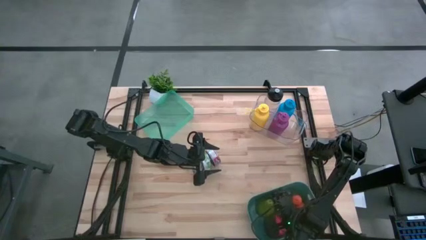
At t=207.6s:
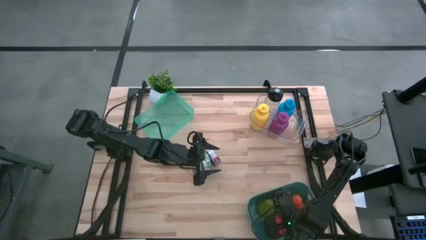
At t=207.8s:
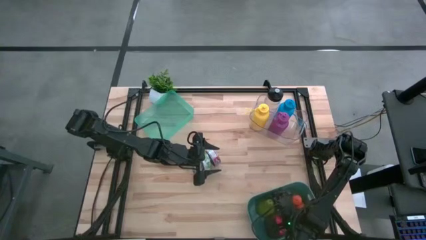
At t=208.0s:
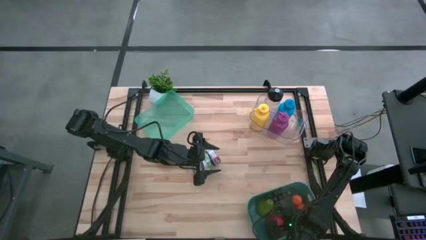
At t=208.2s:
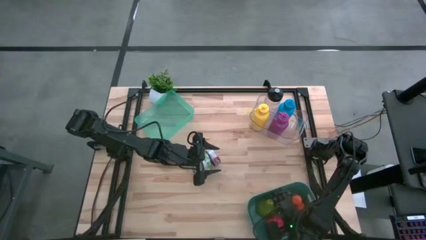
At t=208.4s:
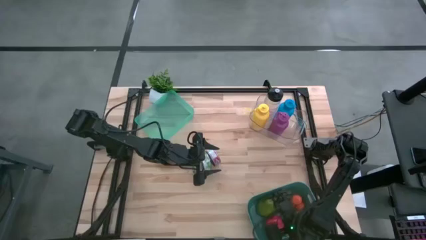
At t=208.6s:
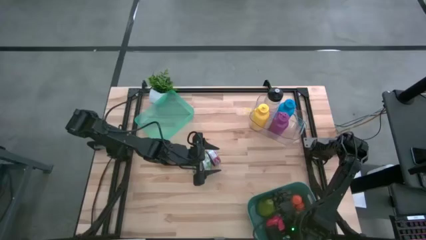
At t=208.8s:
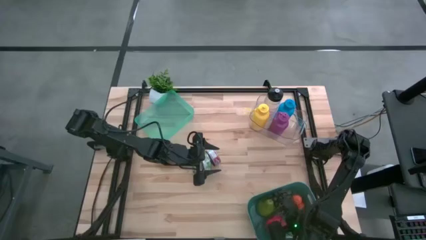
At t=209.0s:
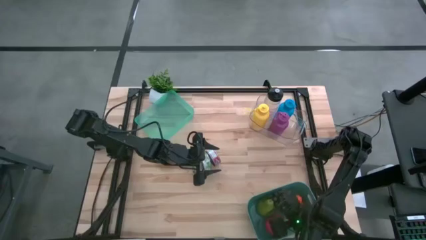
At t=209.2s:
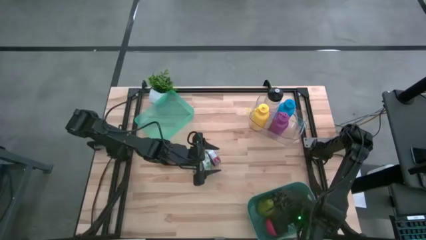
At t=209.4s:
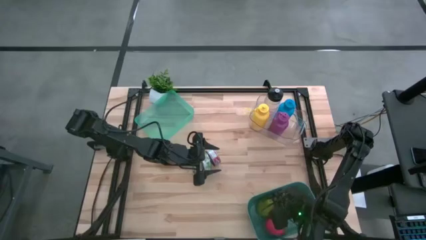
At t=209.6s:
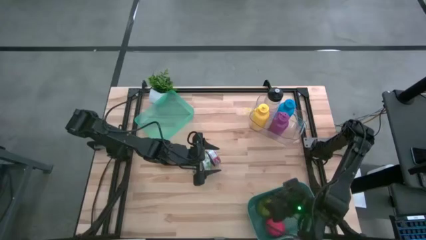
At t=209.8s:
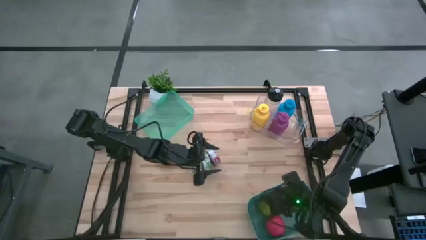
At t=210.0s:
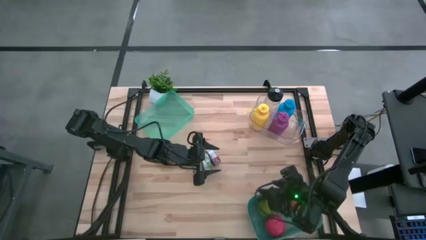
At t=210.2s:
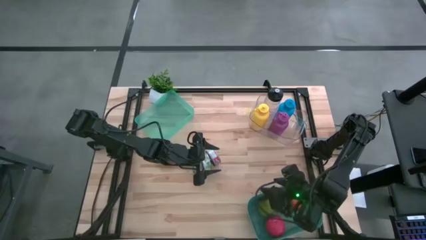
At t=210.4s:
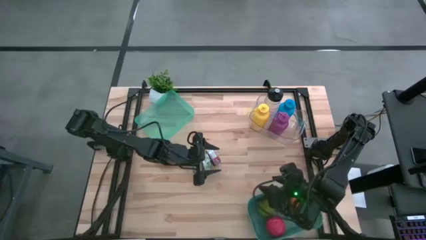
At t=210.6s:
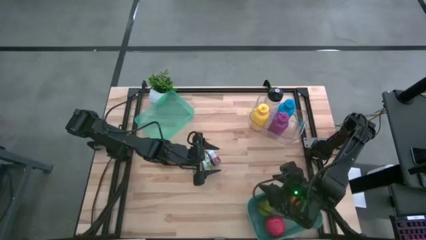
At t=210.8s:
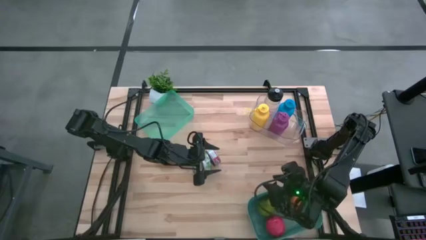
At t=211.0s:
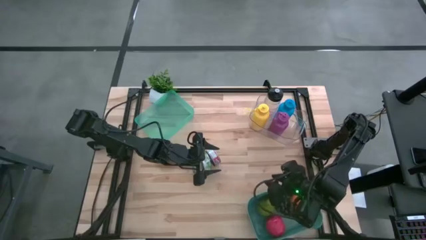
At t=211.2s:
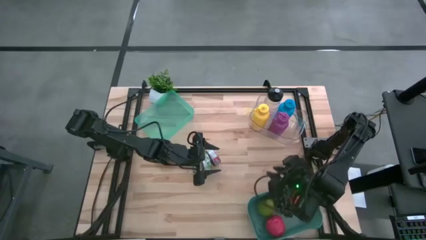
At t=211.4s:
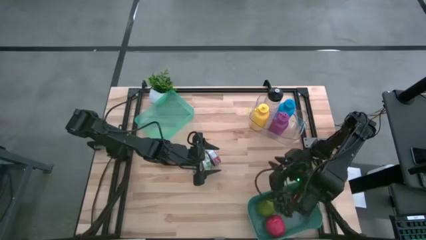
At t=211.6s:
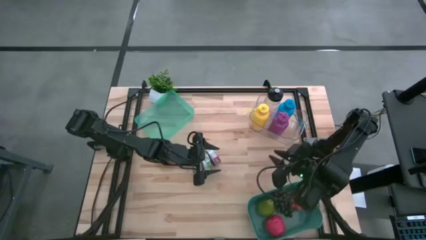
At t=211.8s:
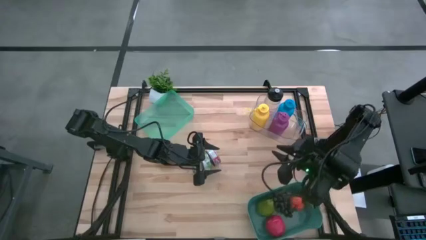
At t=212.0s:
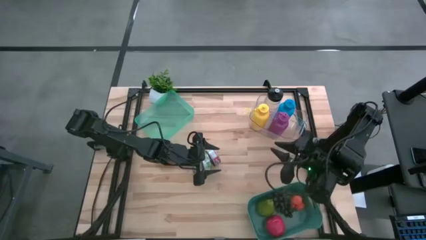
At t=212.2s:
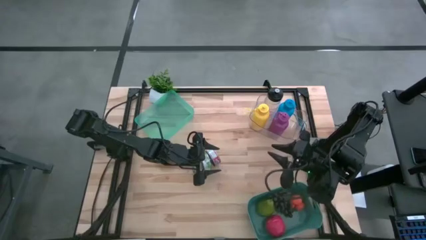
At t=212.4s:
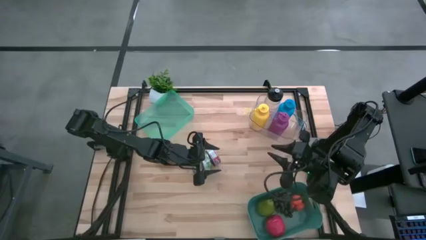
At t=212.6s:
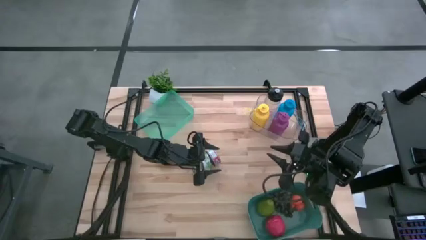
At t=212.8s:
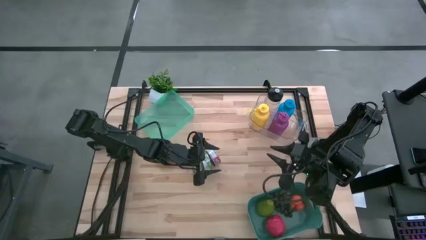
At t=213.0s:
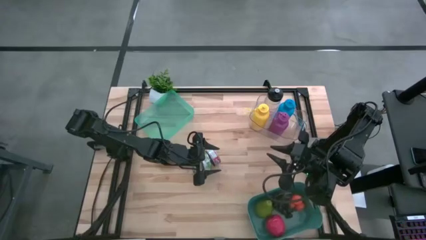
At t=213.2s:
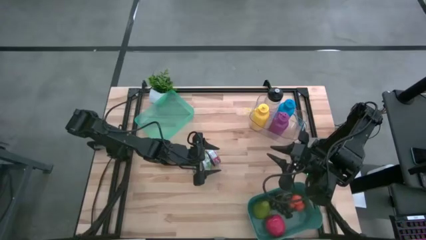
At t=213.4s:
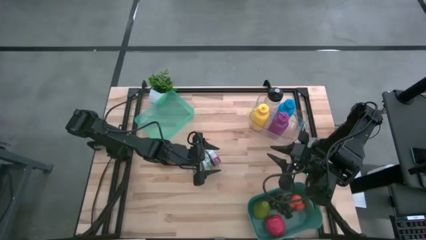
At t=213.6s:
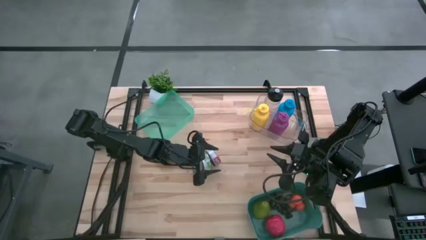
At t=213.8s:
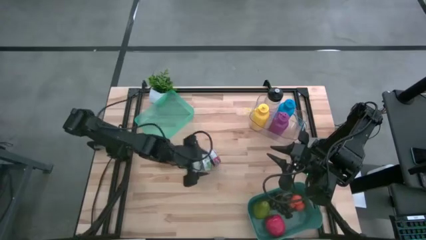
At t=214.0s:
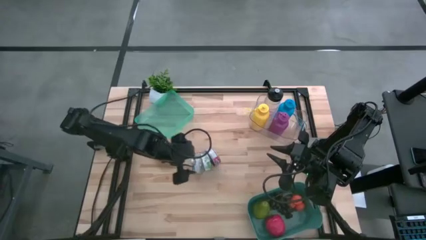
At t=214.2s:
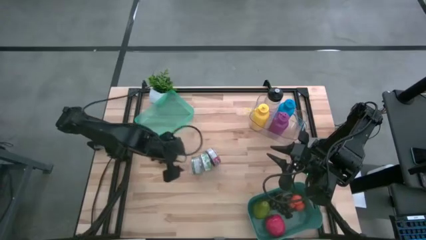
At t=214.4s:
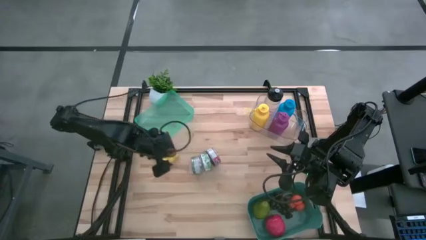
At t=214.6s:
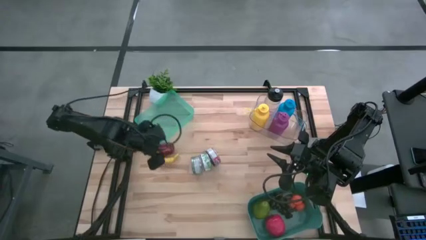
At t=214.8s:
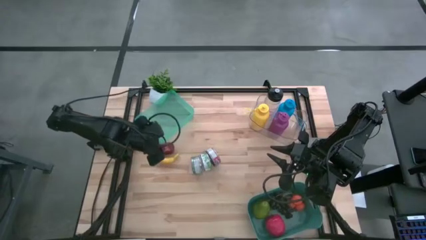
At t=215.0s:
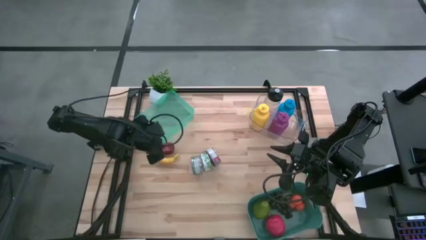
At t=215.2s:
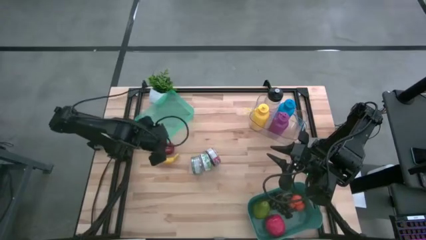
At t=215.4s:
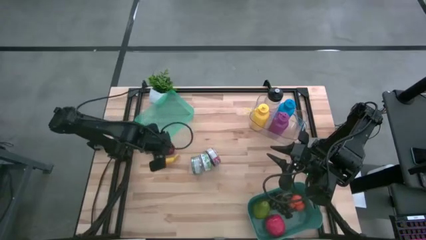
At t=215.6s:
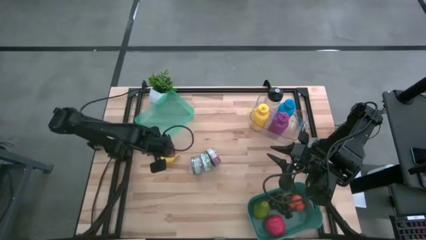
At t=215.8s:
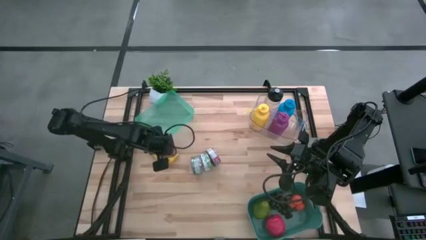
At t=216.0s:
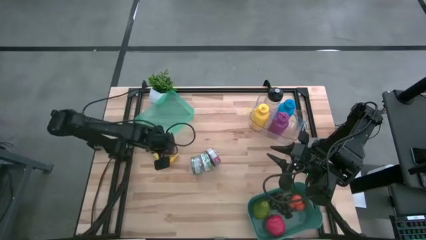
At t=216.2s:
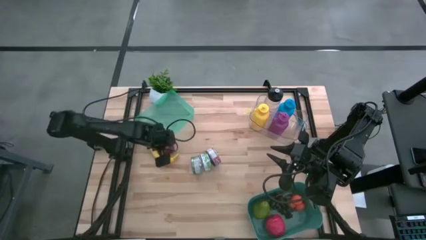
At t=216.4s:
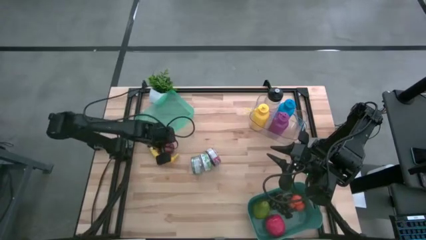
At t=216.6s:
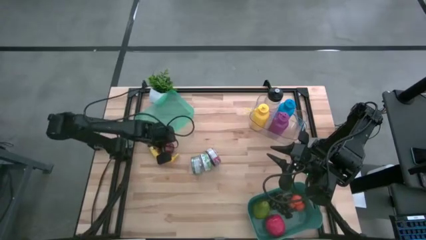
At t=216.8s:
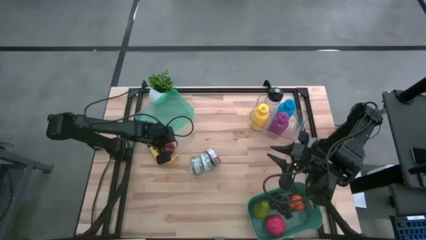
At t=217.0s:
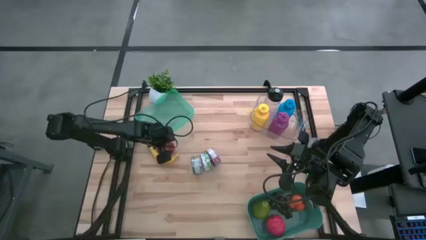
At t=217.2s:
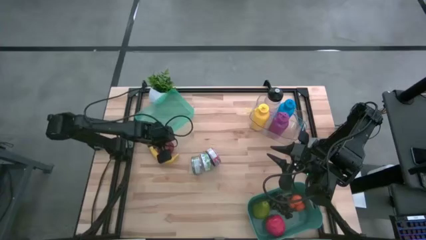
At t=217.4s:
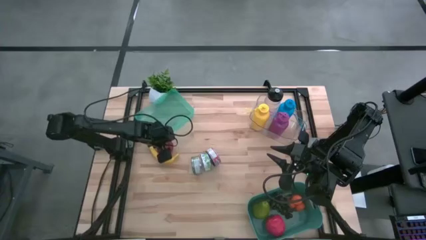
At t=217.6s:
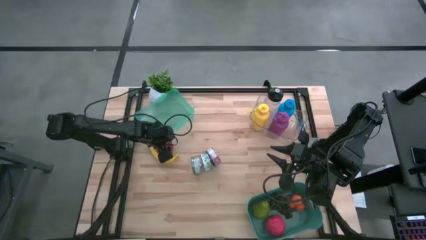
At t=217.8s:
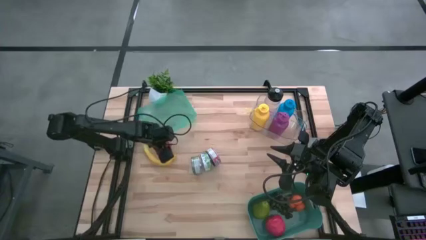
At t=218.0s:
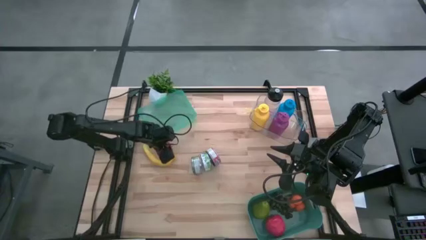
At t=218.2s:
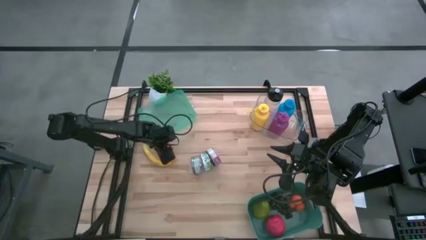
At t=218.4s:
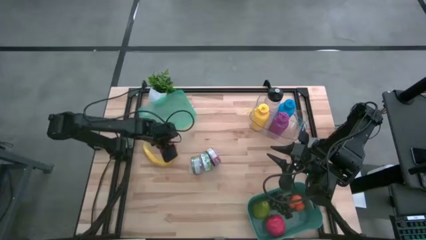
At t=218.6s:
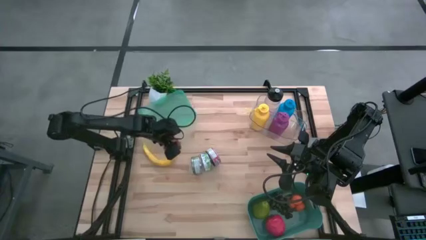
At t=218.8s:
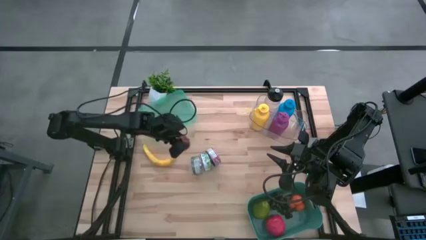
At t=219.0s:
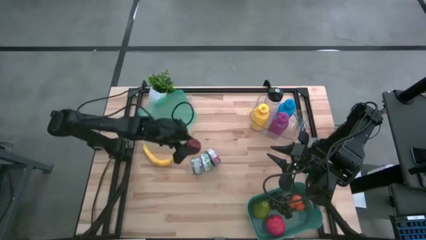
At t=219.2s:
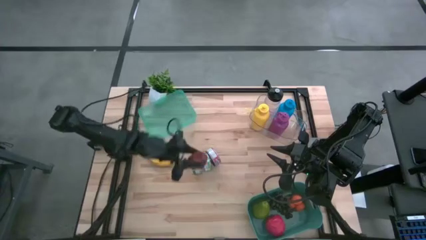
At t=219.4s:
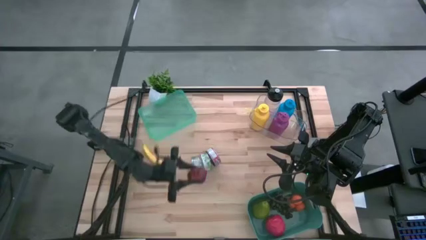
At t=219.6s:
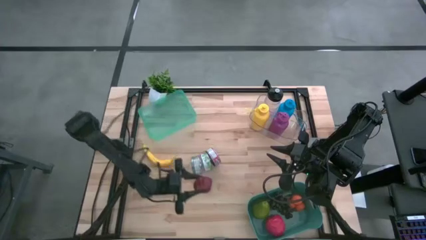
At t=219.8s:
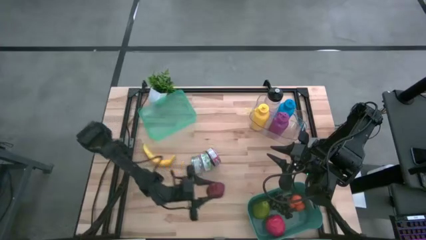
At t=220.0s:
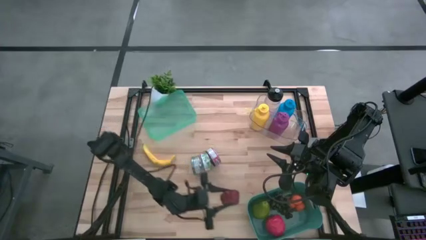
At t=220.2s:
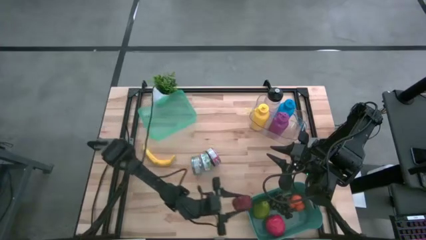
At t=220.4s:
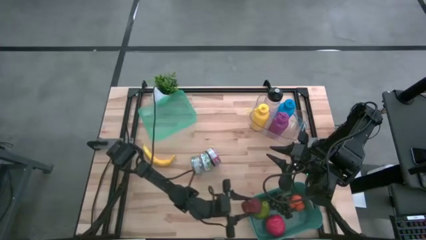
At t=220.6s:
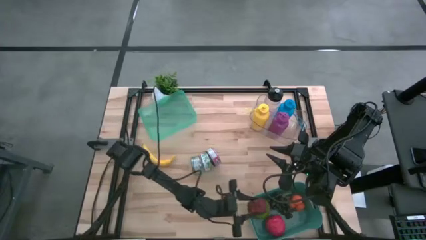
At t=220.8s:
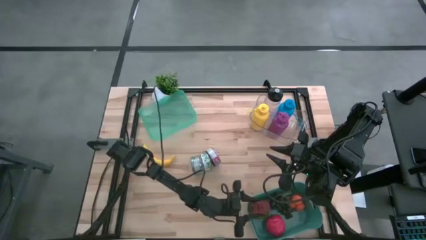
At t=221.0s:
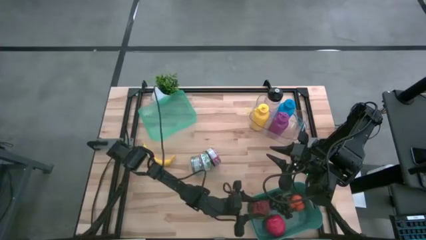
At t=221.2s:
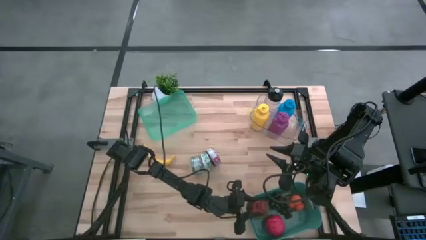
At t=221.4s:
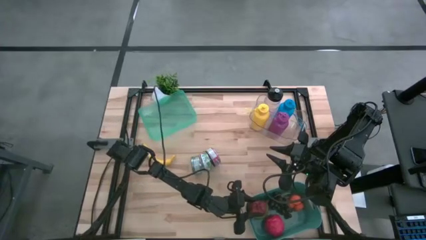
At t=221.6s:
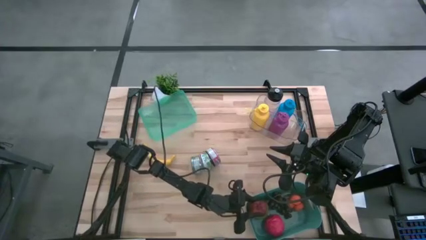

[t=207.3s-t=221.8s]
Task: Pick & Place Food Item
Put the red apple into the dark green bin
